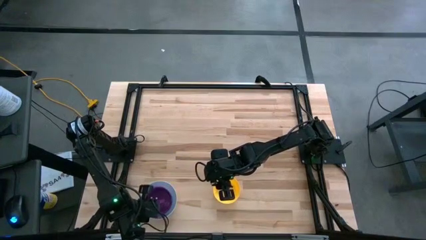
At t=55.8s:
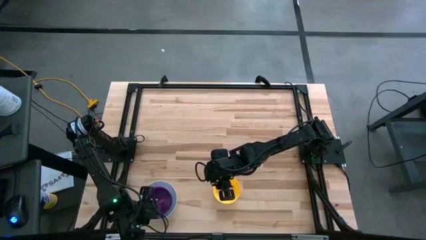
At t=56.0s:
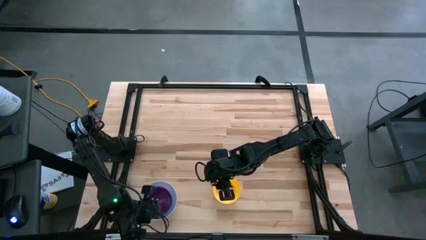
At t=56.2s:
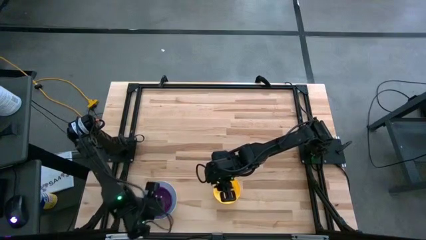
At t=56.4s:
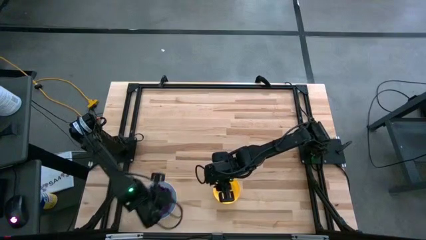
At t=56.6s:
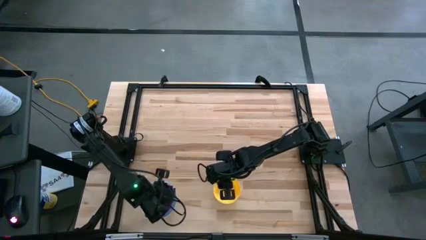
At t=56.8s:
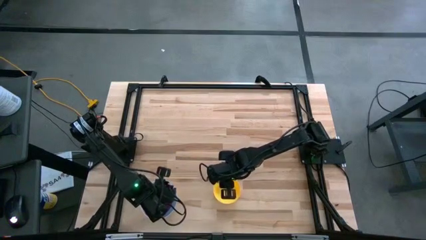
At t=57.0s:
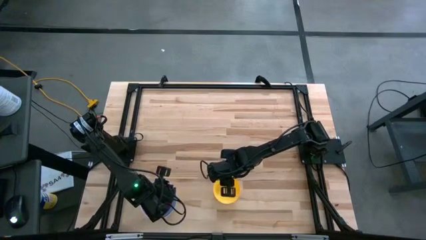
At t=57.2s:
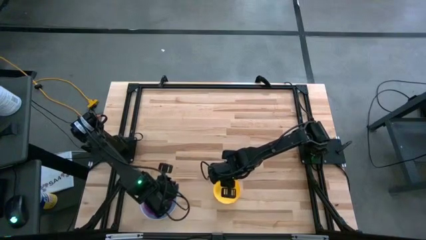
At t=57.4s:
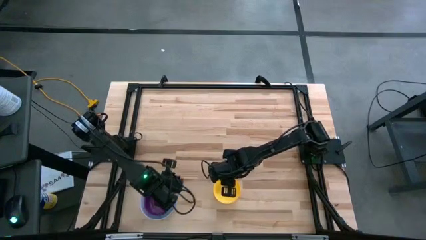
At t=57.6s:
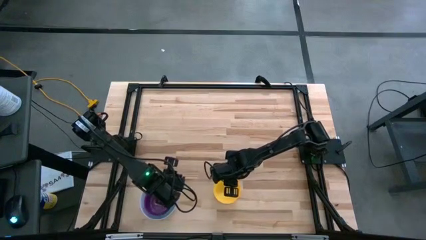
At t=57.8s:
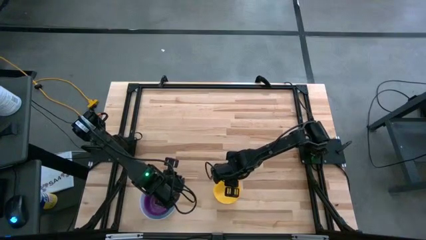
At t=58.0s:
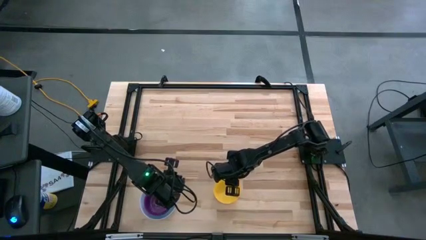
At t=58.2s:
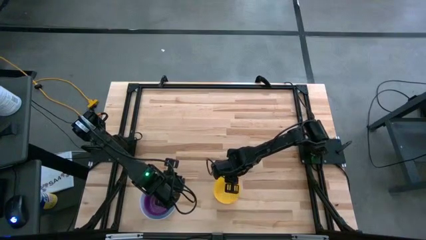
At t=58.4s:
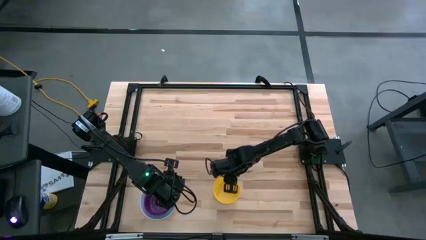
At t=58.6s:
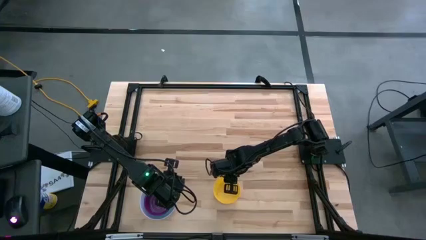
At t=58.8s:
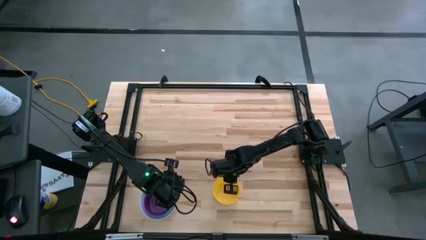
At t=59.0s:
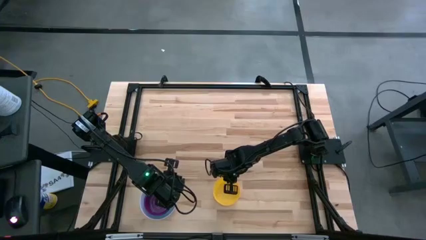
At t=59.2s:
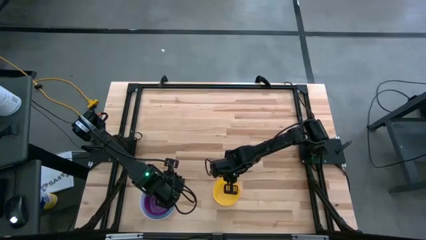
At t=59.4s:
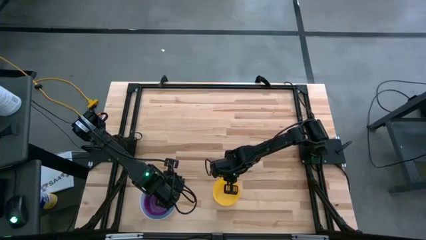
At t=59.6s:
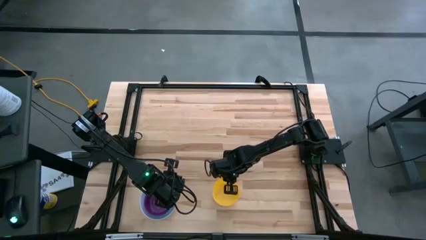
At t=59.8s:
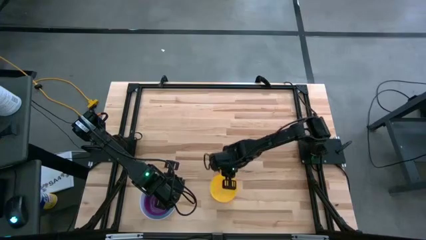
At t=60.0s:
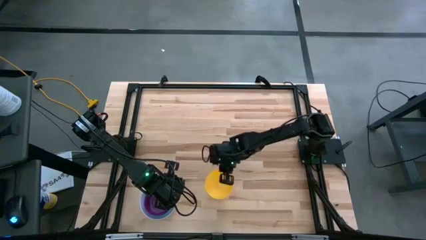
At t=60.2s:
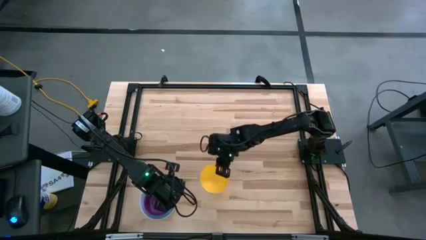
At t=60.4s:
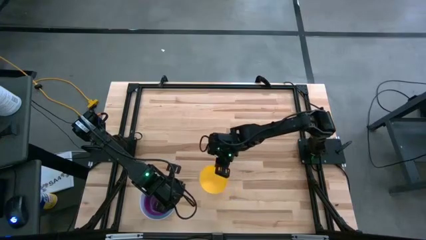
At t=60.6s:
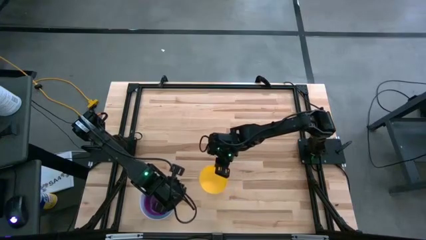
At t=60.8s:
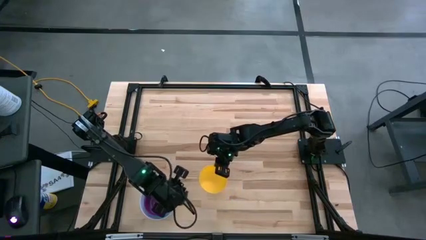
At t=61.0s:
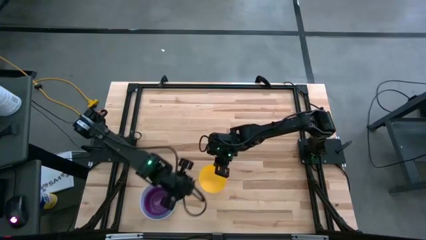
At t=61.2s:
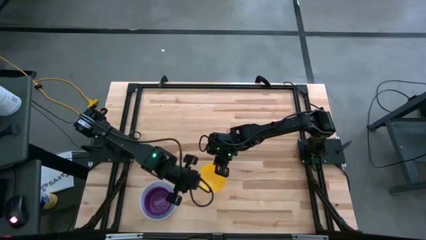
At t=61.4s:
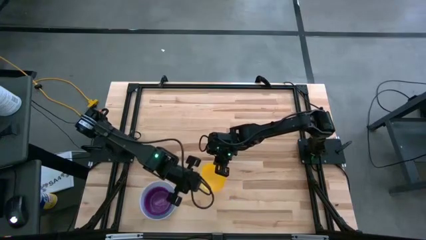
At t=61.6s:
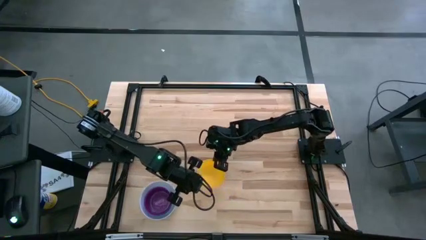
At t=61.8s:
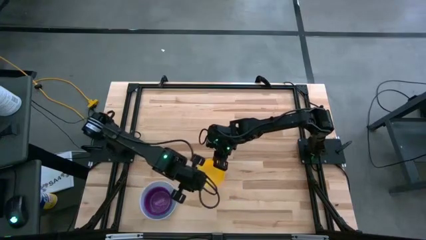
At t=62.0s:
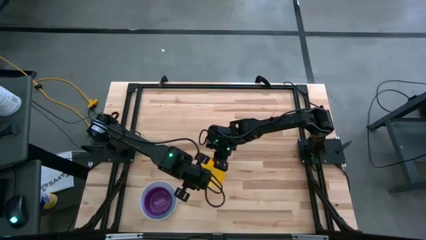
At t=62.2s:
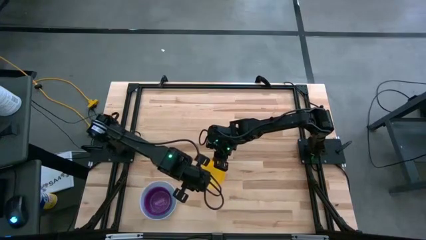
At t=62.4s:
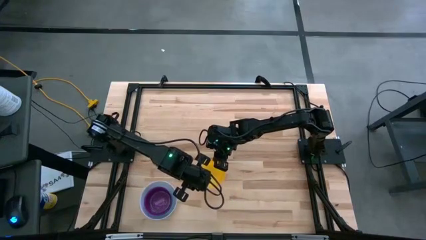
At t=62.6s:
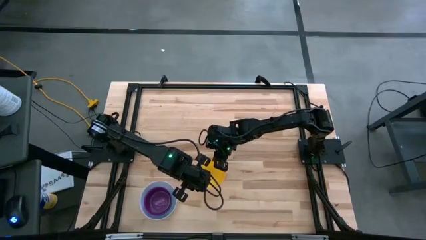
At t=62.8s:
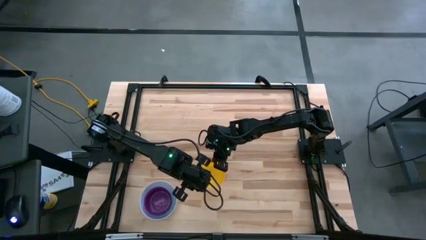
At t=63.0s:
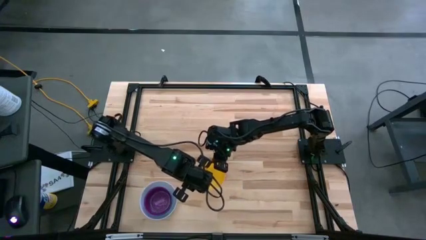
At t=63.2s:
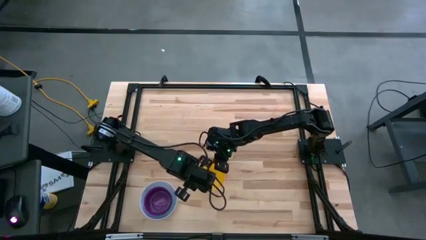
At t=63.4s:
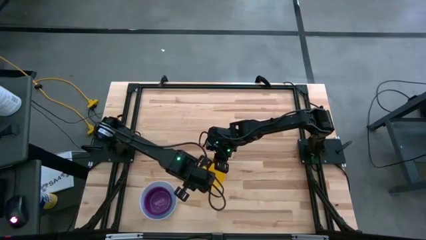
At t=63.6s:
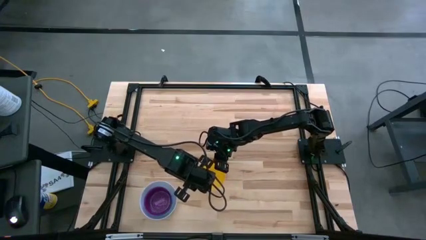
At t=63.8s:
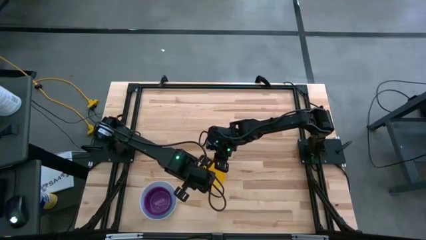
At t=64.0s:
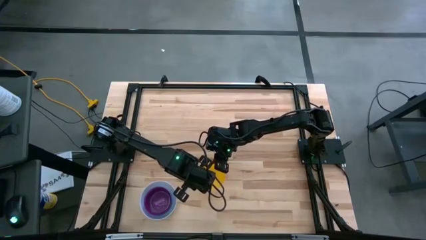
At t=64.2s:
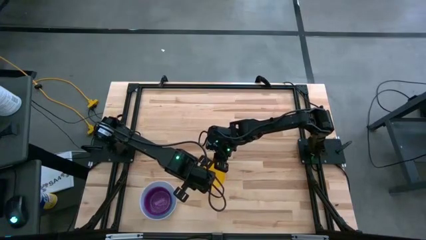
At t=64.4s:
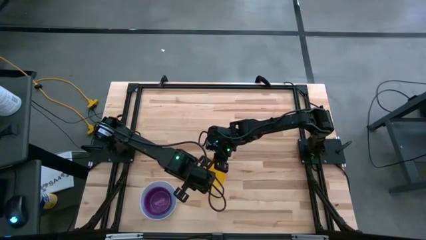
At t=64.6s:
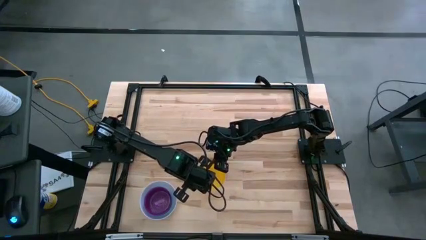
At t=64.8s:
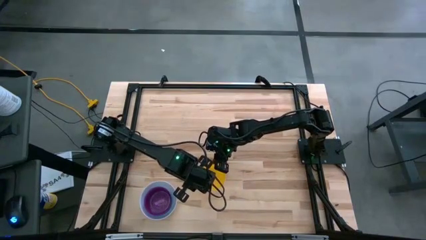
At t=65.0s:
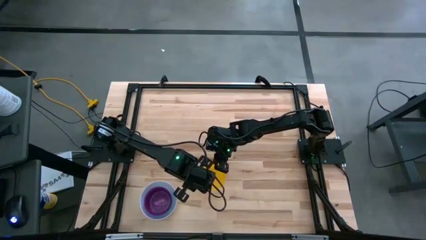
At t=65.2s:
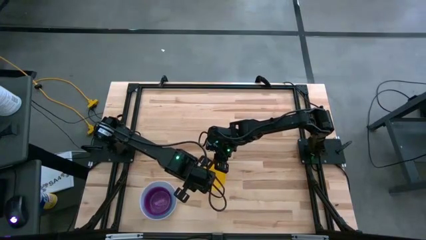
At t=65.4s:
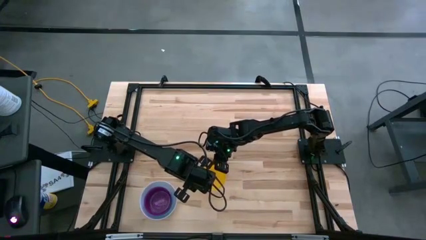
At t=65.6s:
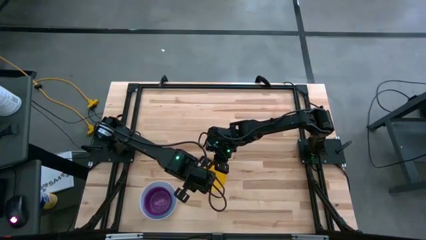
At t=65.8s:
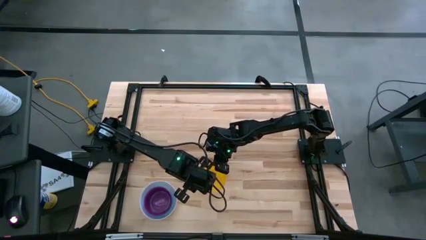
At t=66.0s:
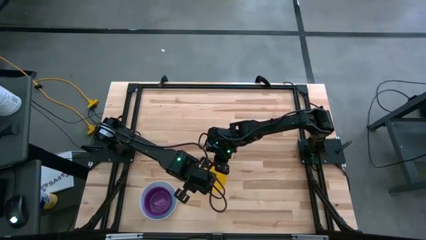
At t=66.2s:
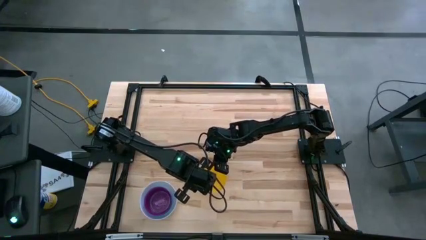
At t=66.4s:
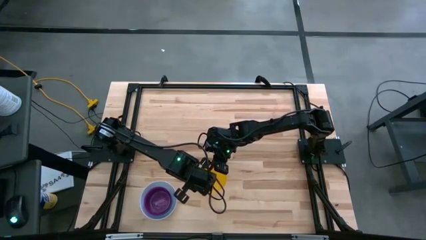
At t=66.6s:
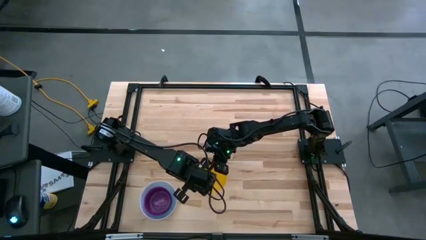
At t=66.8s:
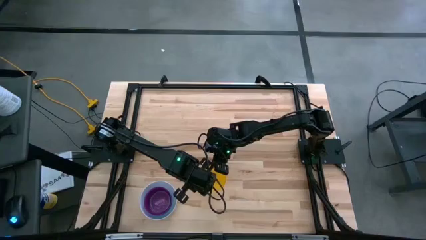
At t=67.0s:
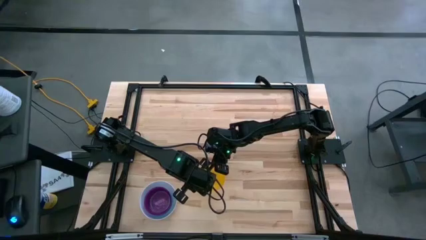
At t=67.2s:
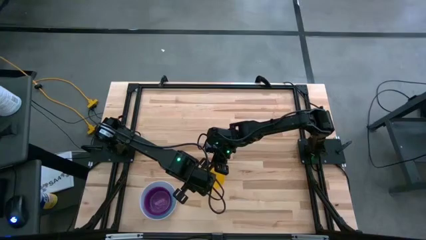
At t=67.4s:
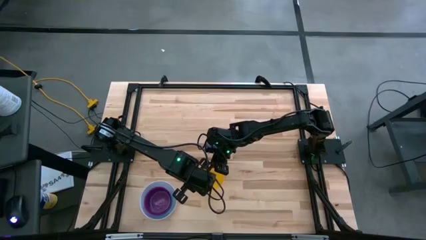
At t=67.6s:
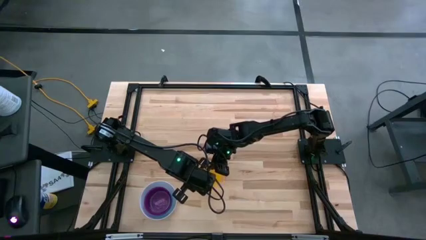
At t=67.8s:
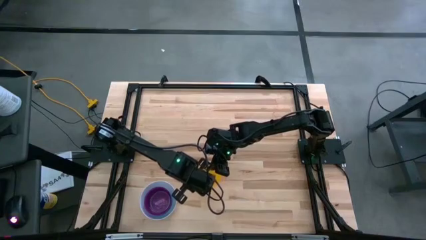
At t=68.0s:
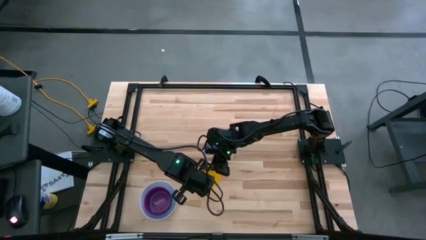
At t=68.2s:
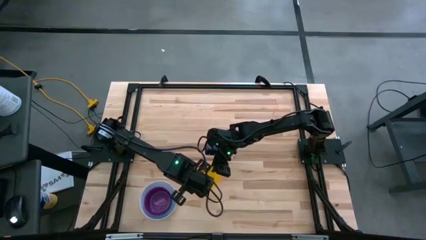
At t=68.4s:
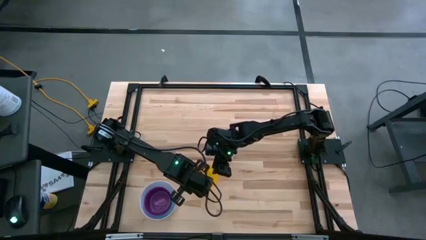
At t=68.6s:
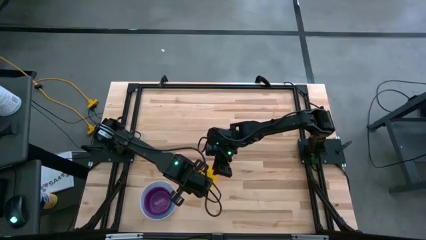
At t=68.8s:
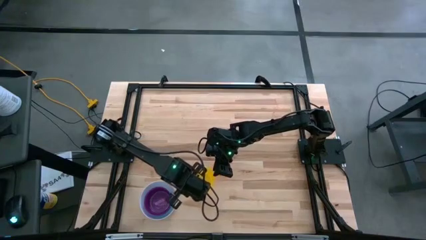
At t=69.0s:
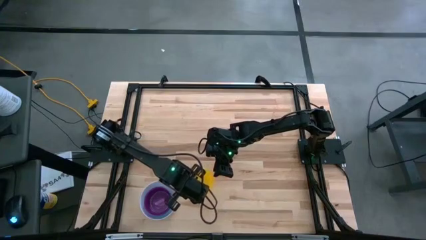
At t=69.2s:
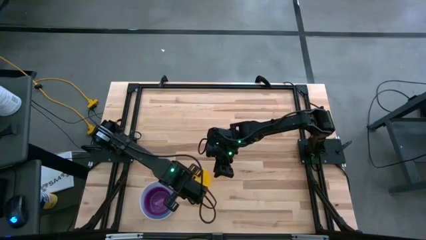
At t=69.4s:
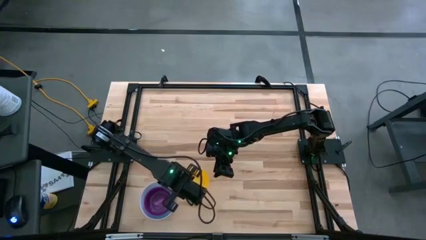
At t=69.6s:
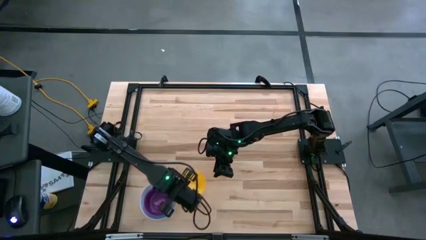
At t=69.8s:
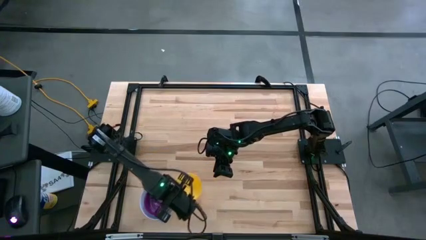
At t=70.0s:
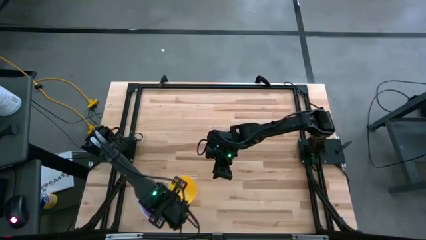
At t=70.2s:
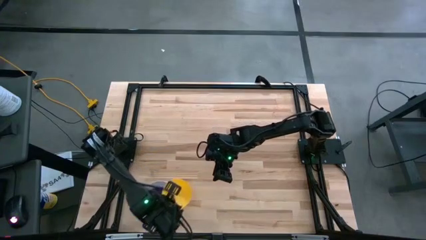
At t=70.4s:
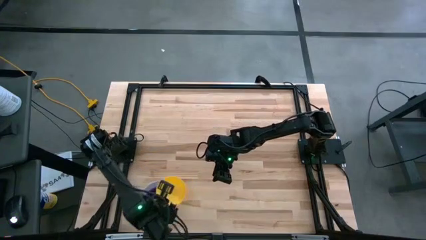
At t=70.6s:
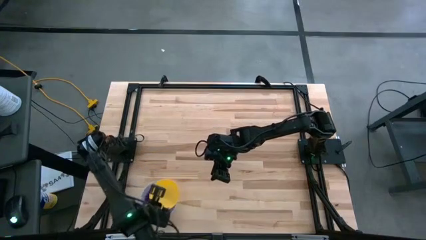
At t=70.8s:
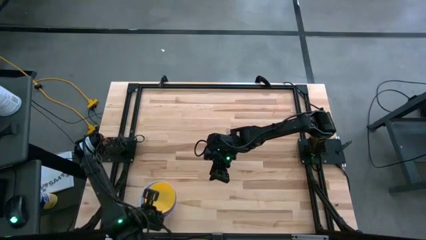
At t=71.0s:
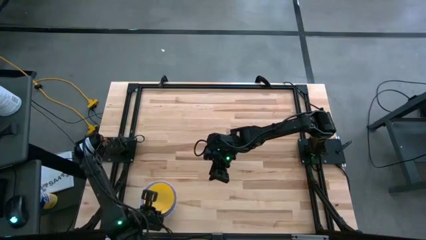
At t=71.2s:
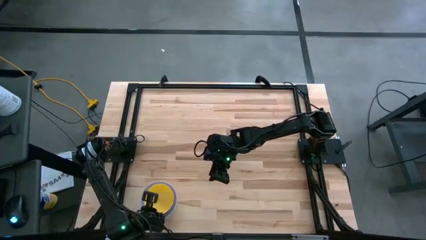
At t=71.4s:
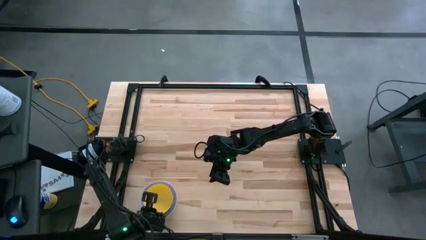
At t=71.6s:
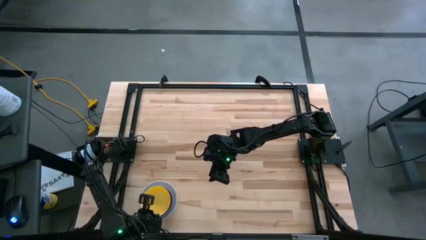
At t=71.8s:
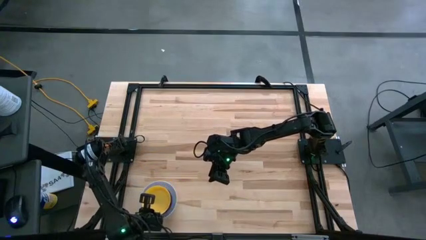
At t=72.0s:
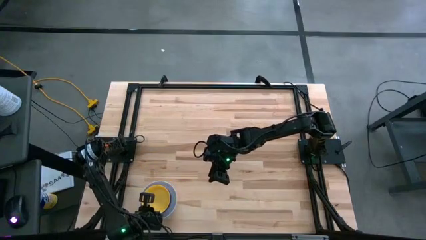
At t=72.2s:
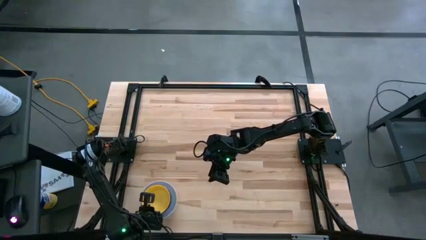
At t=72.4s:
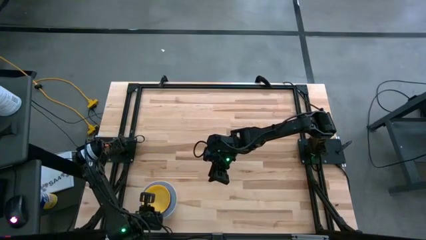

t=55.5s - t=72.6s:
Stack the yellow bowl on the purple bowl
